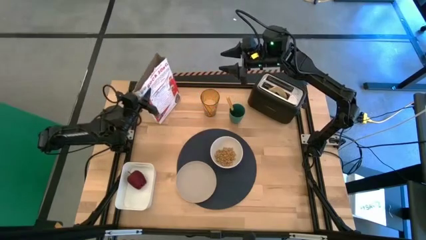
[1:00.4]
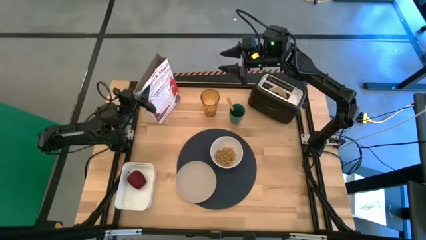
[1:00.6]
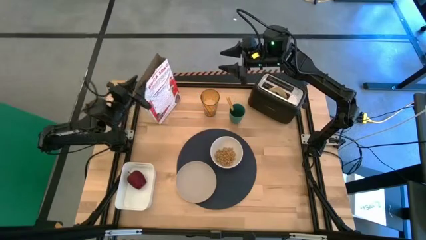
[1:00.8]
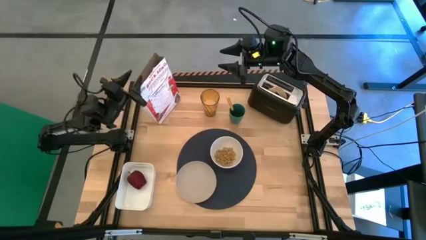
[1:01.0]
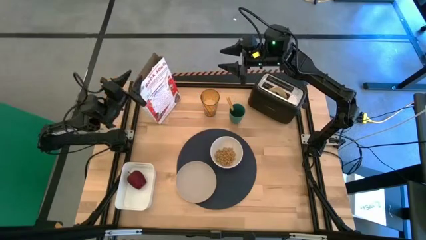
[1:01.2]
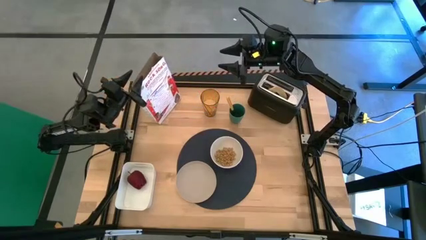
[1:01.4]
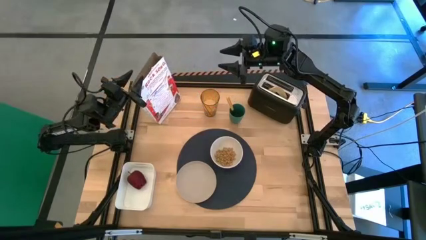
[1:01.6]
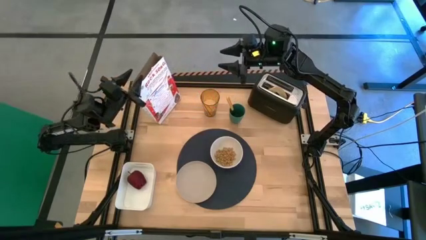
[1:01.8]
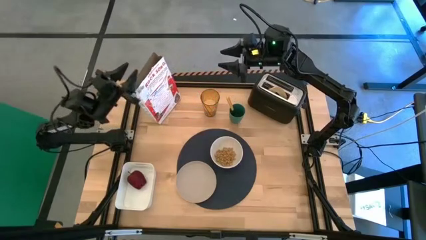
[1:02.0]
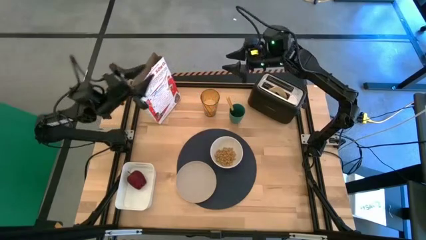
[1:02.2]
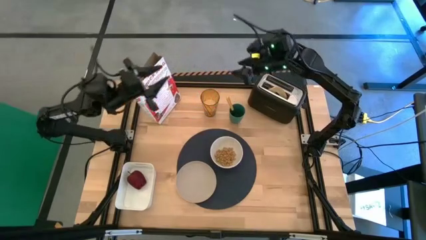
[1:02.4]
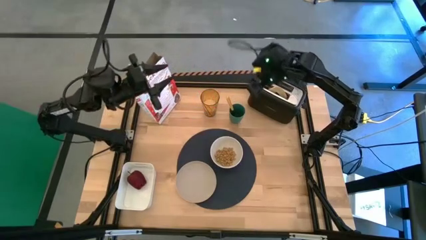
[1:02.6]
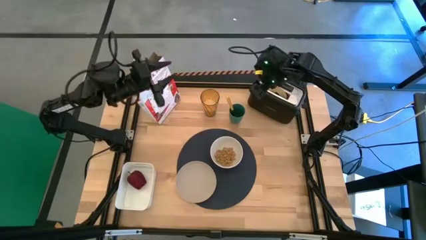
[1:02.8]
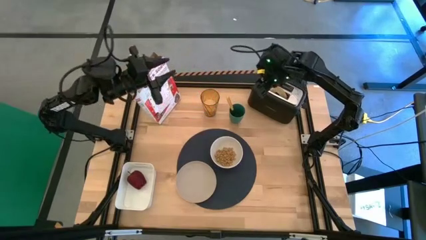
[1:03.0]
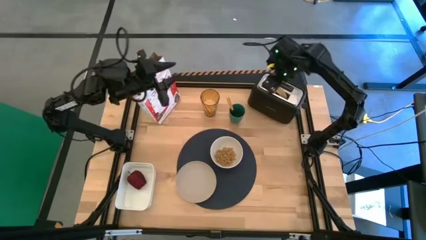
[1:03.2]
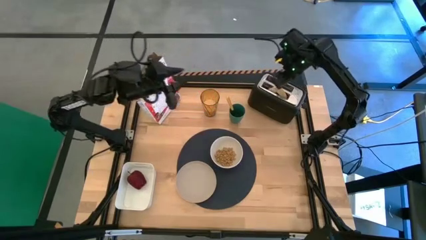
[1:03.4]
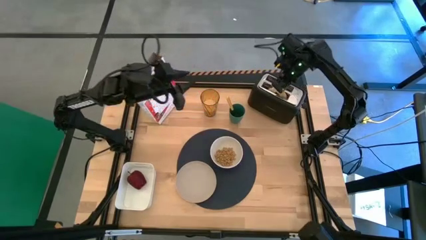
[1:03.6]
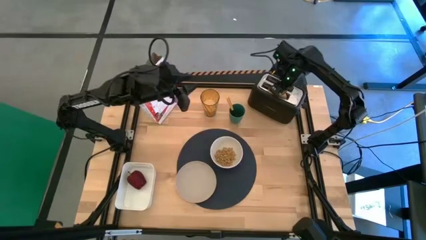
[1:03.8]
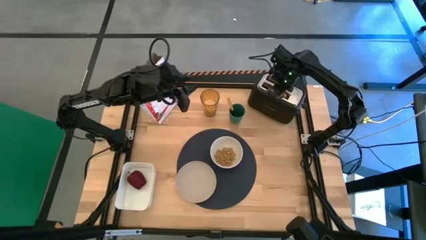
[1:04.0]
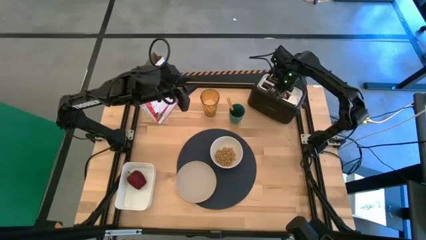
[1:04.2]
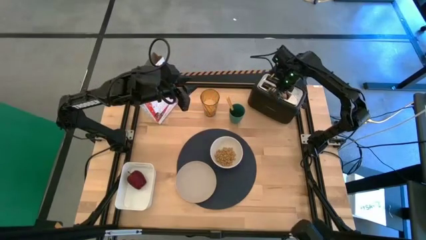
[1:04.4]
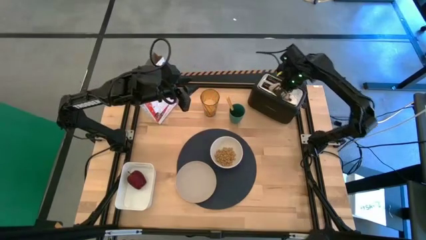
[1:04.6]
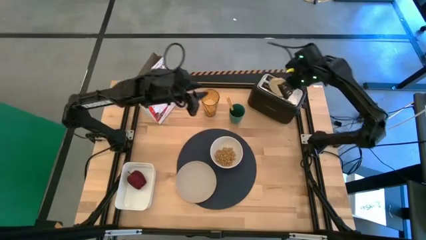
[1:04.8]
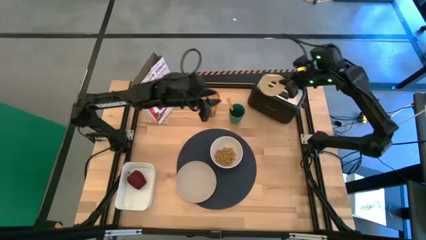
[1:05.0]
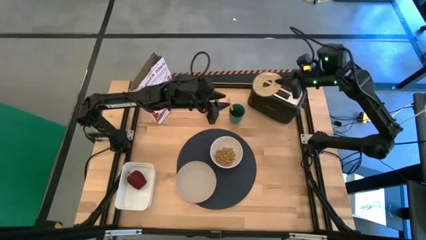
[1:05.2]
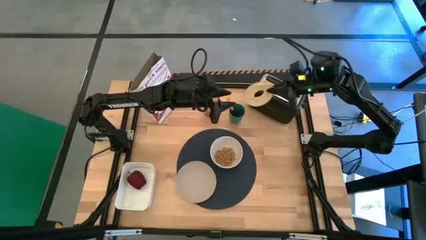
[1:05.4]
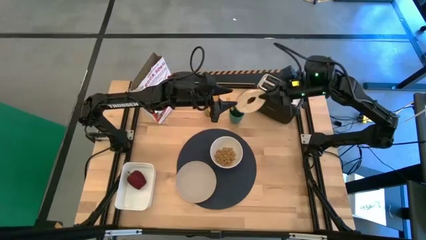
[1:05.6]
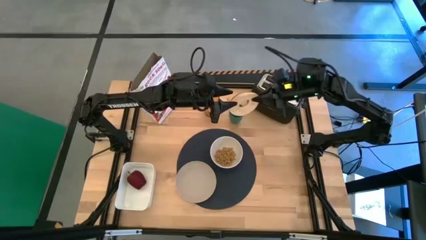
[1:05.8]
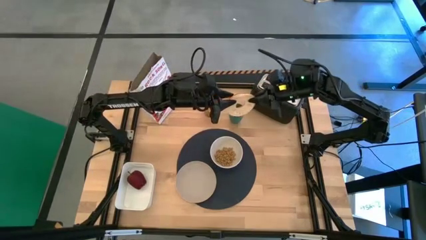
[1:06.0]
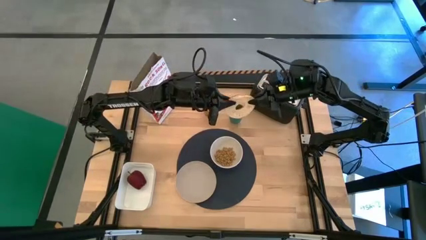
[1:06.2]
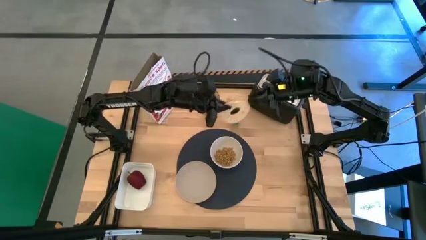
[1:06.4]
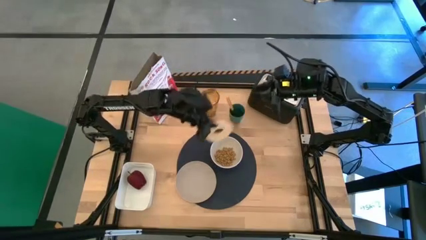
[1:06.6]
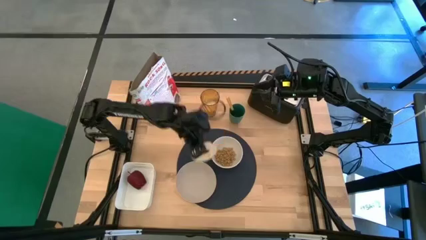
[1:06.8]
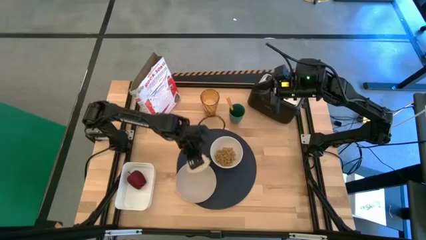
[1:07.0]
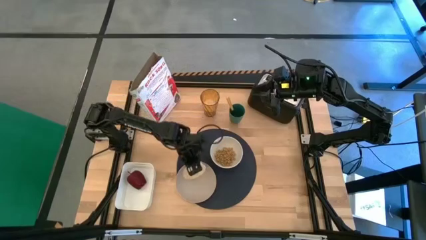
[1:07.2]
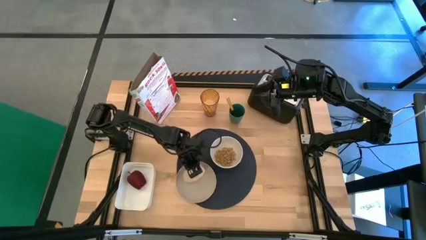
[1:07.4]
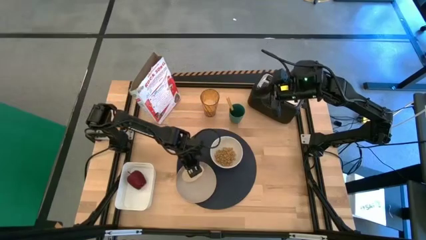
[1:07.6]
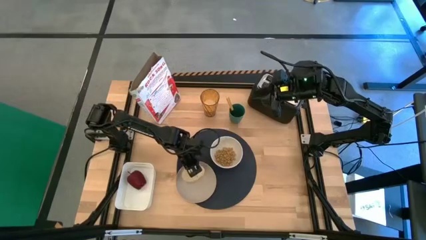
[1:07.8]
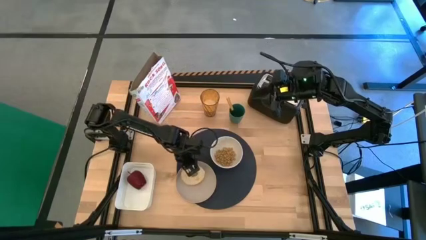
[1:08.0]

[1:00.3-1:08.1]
Task: Arrange a breakfast setting
Put the toasted bread on the gray plate

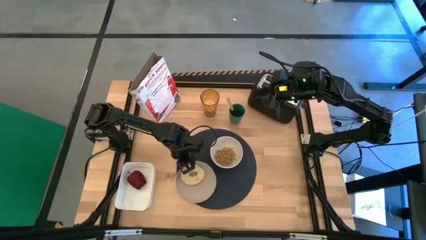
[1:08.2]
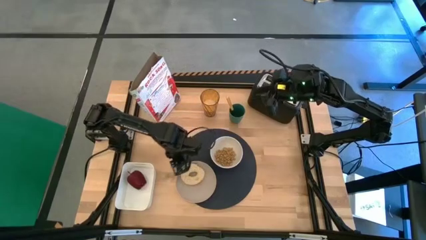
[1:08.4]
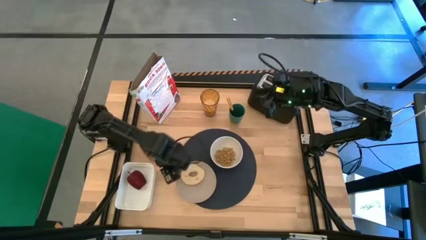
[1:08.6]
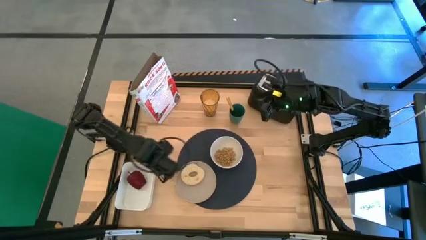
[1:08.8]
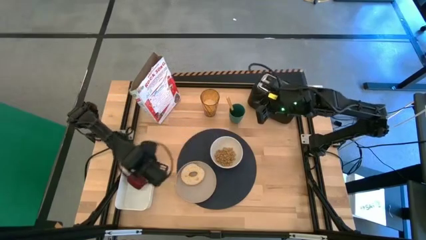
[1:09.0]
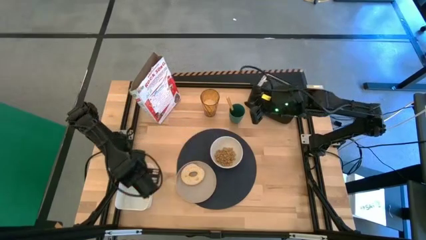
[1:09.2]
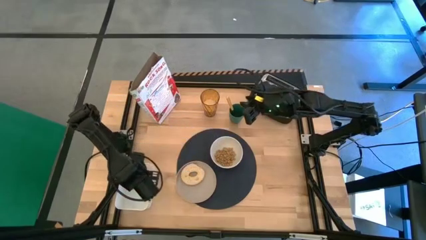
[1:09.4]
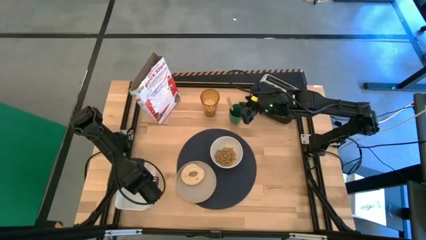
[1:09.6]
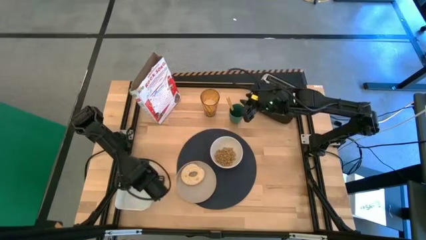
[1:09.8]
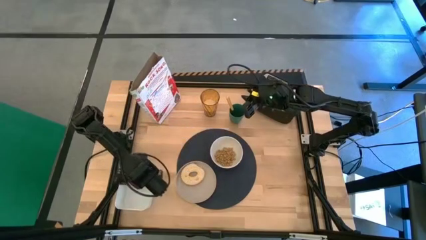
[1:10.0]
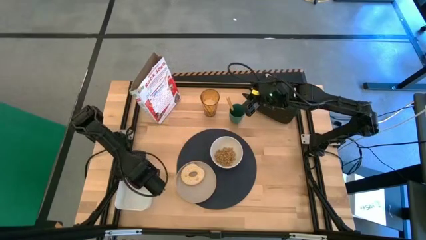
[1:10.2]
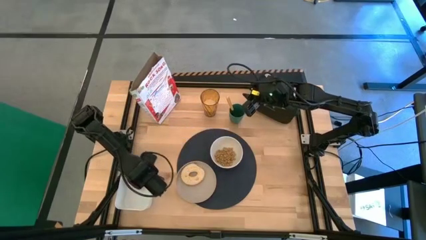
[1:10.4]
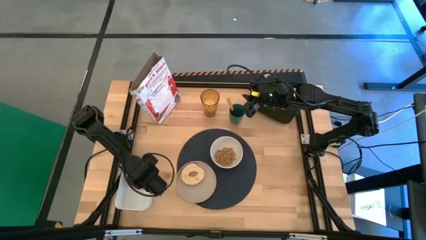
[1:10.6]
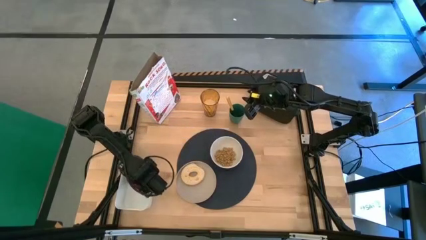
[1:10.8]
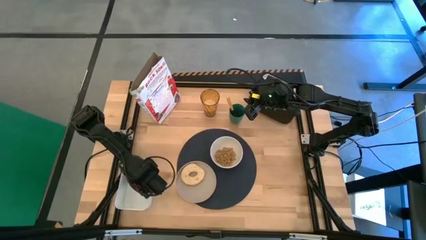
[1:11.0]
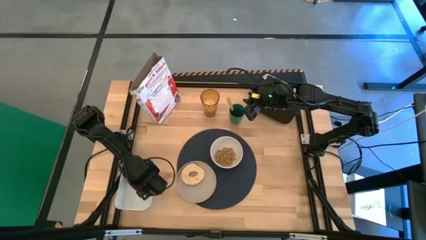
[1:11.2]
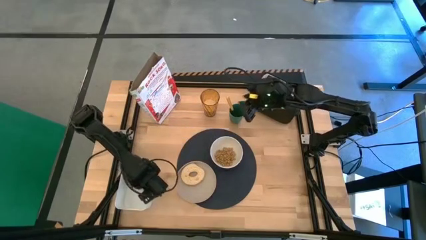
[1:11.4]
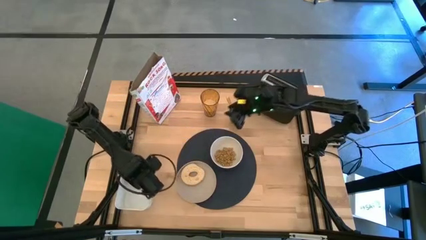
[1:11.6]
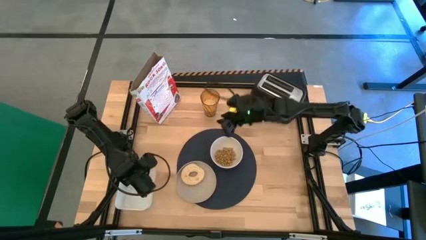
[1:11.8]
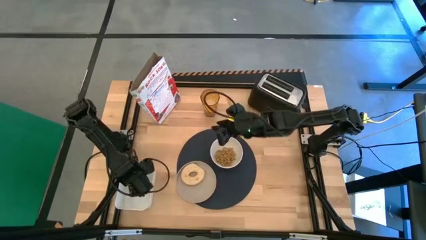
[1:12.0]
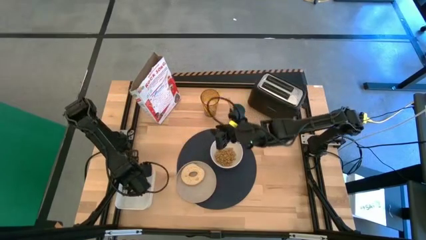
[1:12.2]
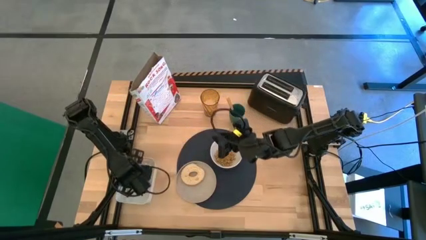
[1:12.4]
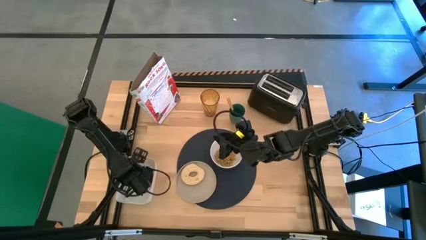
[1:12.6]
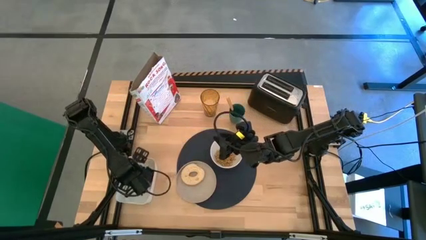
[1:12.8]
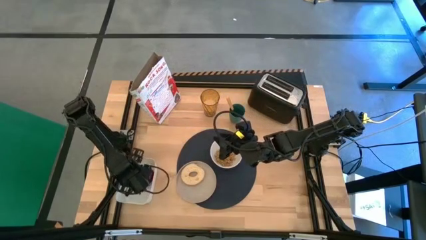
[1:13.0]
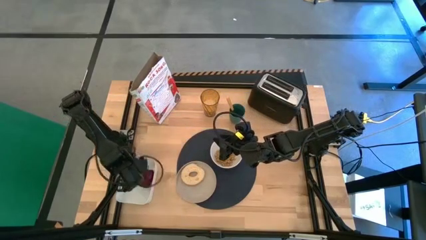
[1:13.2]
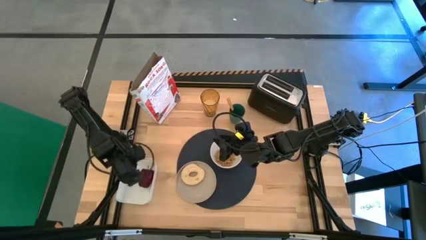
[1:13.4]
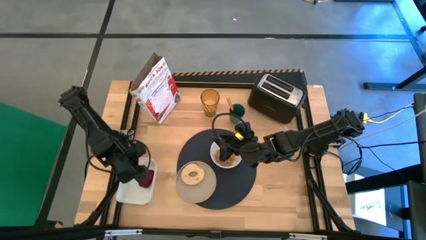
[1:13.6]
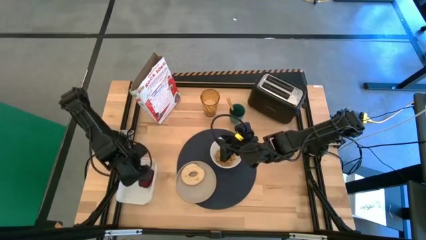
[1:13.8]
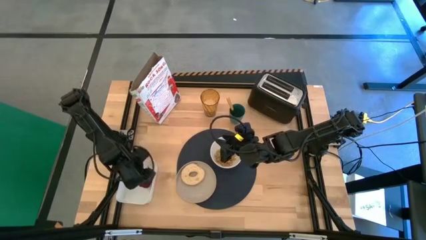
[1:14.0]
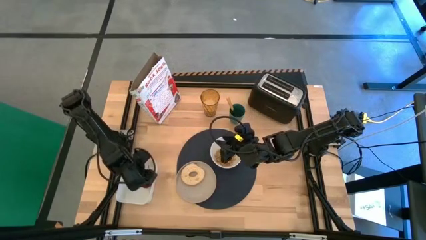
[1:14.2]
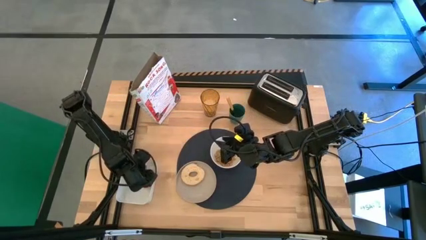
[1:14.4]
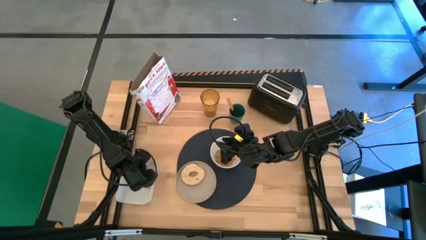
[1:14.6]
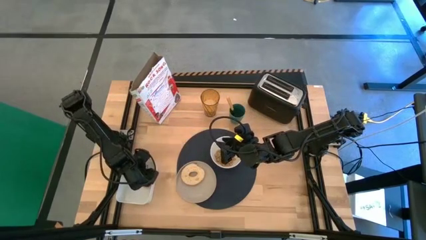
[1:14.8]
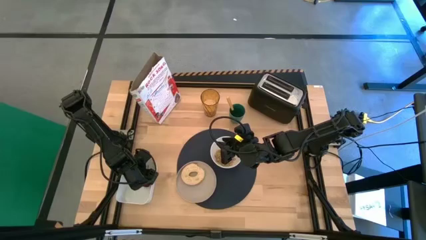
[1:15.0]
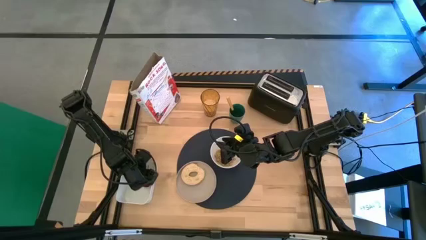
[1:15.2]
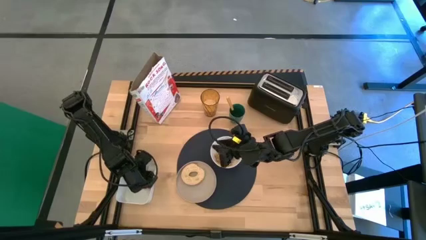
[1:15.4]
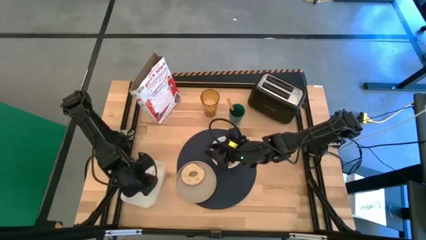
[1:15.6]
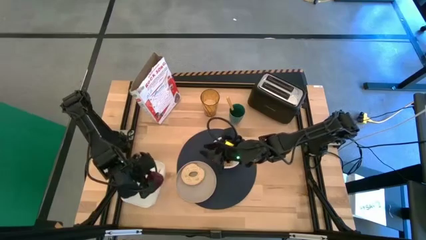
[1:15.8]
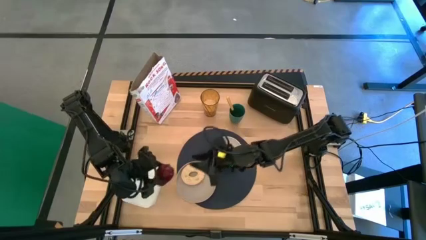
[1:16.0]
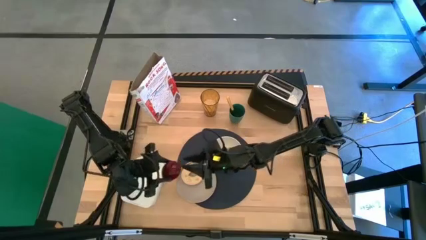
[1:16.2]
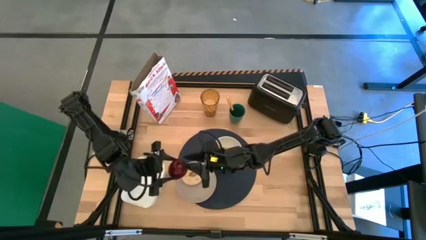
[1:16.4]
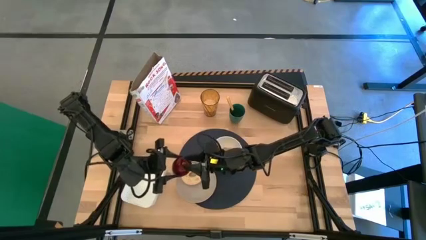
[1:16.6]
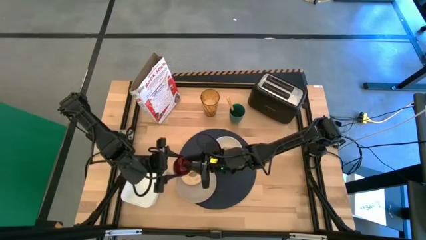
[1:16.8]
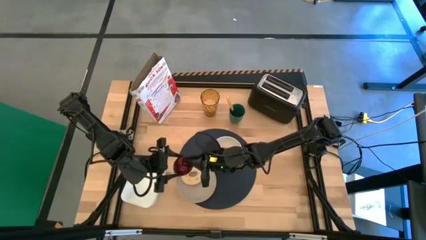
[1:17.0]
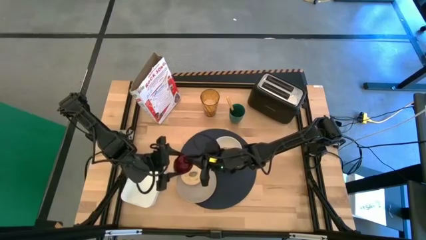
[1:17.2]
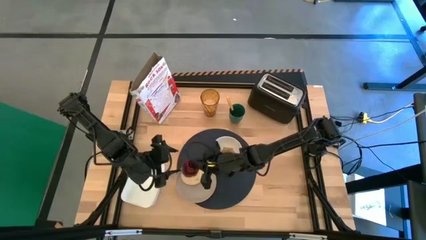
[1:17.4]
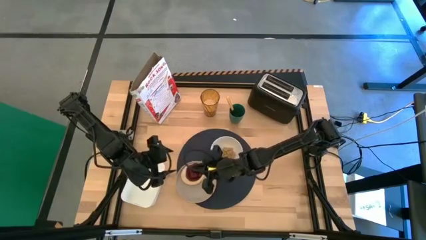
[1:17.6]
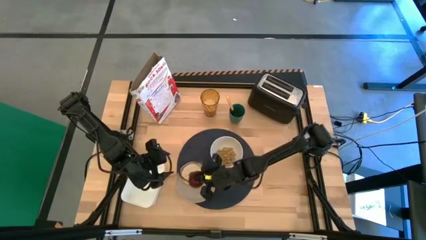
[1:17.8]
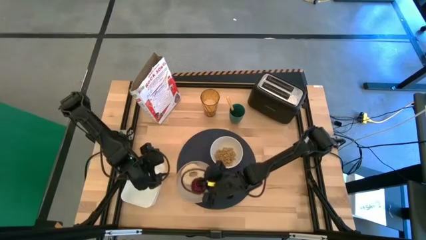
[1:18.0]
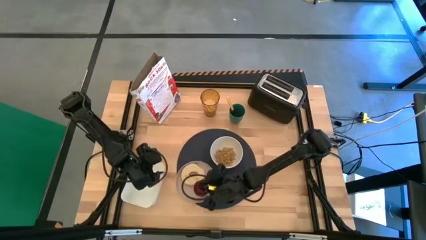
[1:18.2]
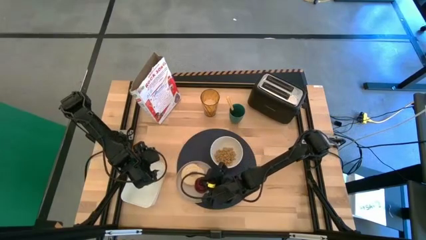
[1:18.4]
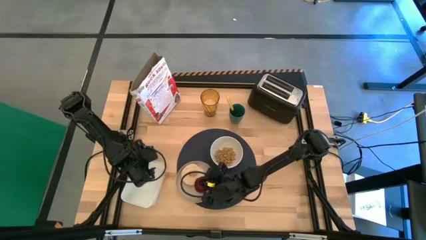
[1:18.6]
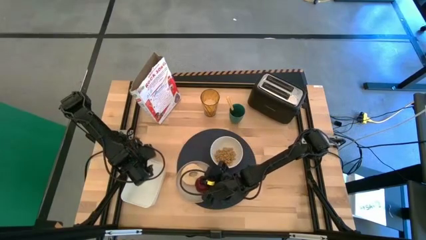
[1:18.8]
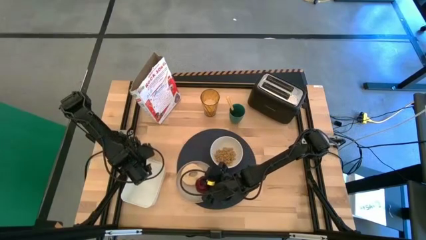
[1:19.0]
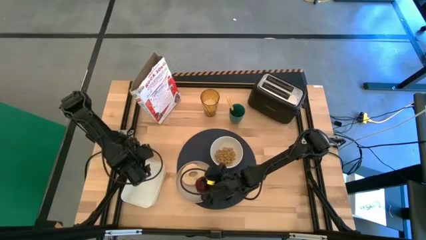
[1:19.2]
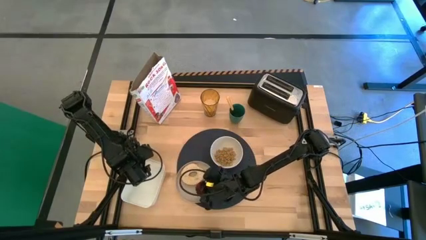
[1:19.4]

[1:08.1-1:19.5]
Put the red apple on the gray plate
